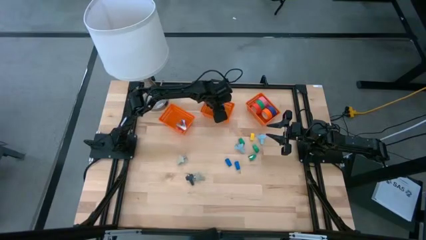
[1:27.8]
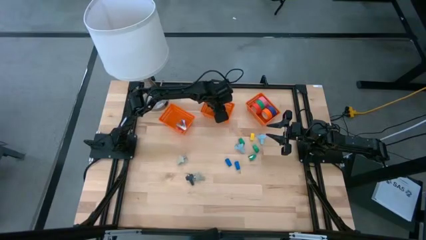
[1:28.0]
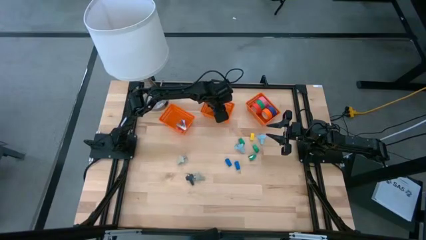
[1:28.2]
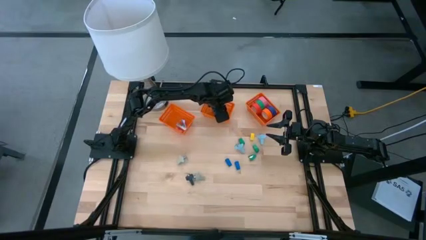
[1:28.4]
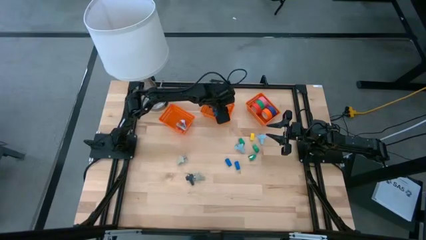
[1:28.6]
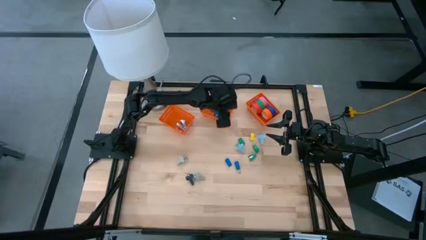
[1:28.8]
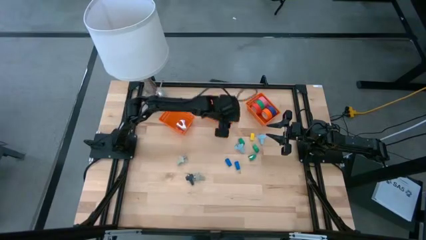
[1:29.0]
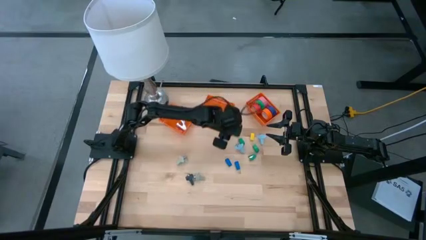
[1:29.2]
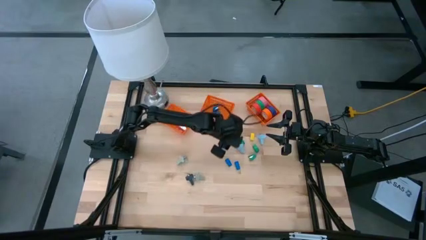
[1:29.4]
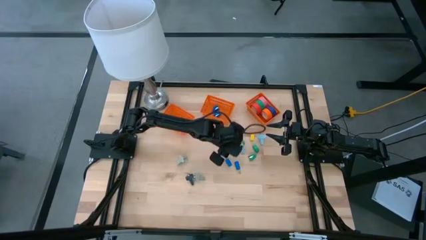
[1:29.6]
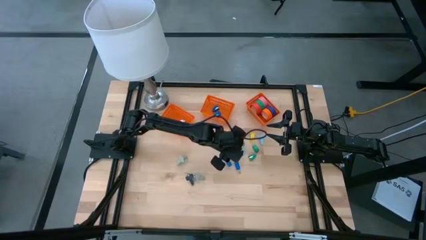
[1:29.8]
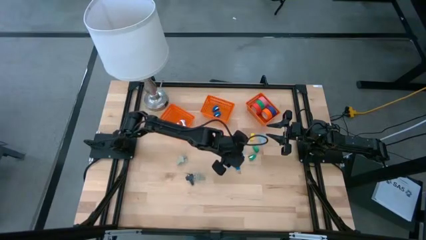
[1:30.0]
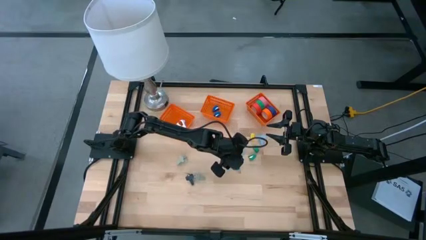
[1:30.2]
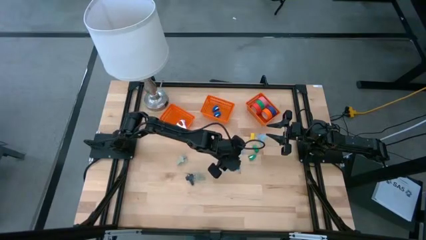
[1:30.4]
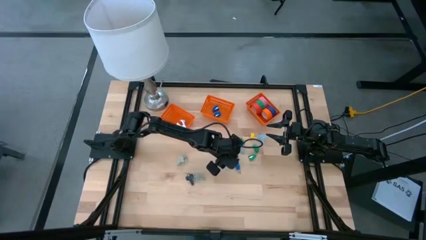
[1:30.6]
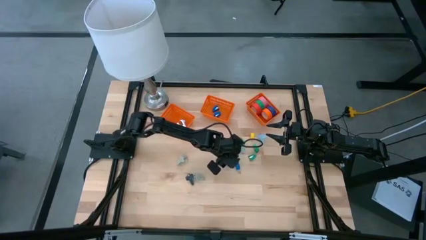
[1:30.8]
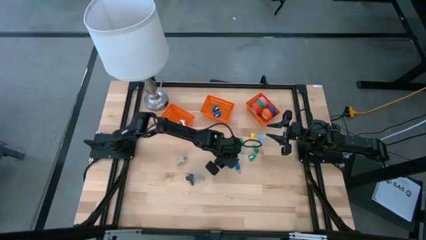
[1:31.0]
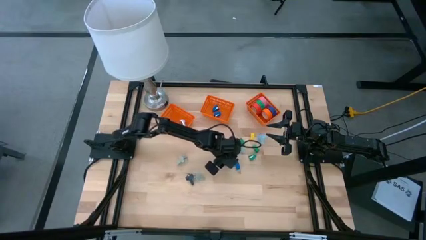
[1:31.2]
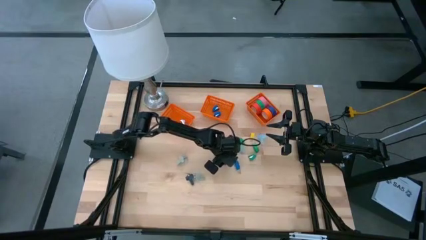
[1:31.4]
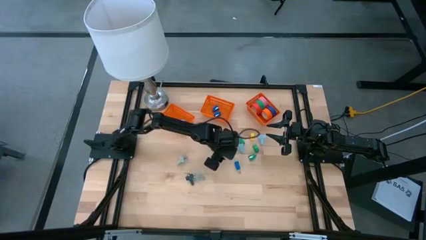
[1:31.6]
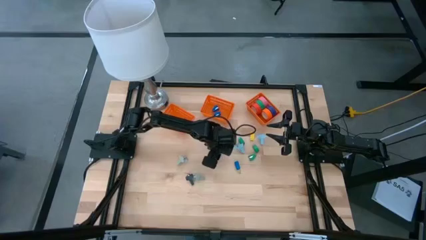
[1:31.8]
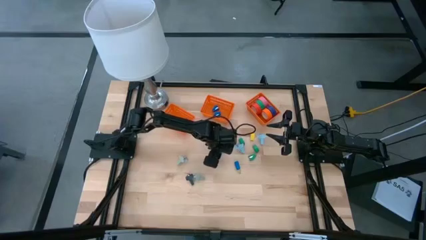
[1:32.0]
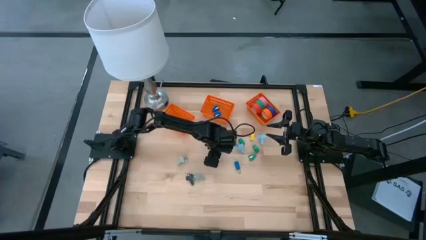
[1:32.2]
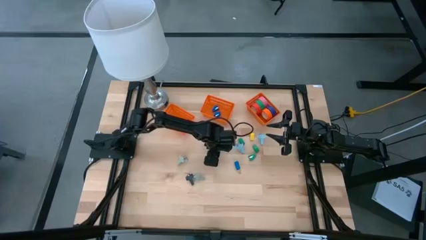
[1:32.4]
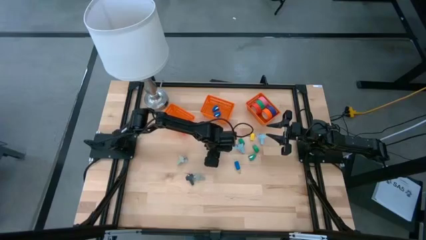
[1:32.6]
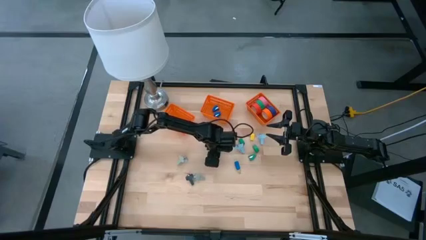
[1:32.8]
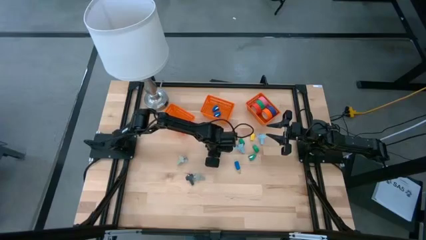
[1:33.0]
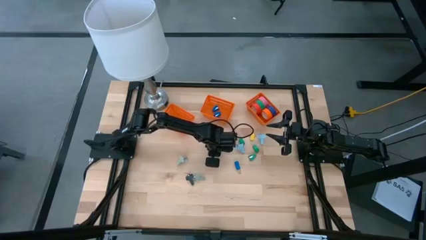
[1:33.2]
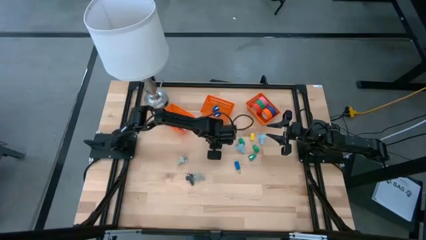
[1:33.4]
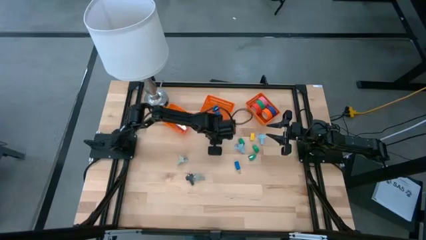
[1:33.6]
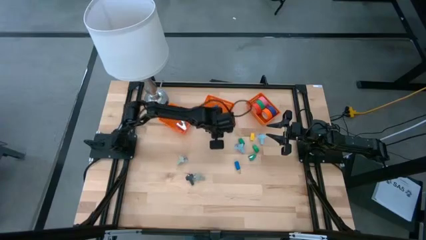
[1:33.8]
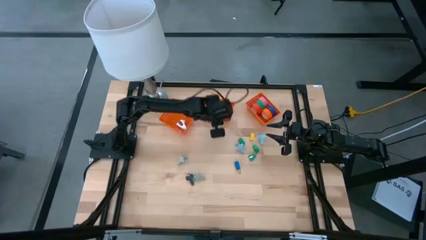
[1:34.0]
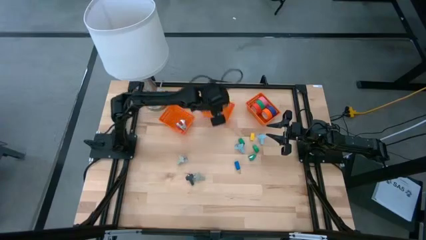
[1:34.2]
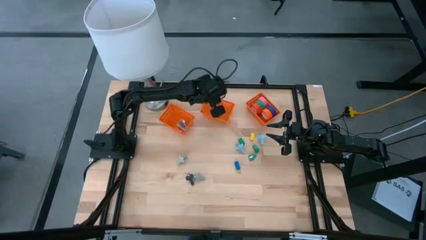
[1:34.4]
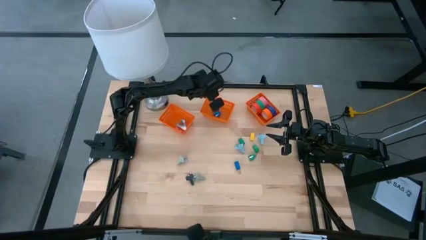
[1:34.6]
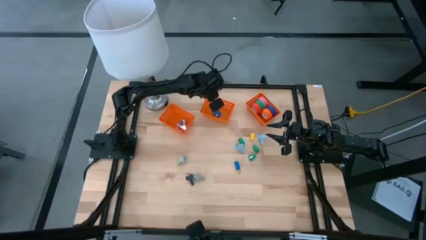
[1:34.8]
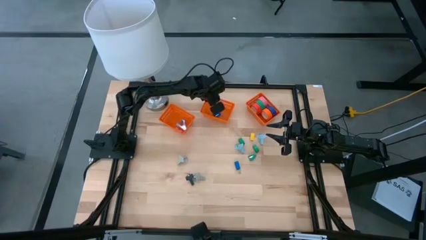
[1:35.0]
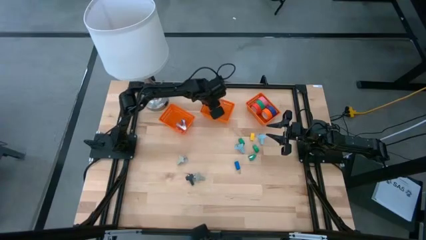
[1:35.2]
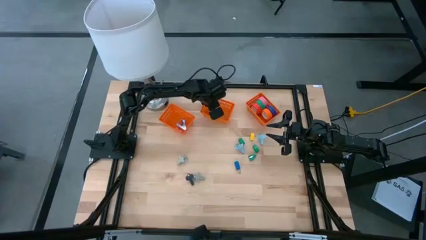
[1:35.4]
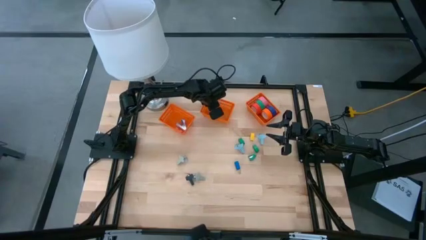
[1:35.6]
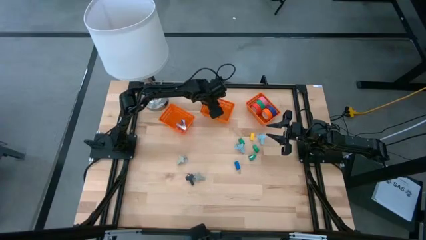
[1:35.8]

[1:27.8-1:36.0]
Task: Pick and place Stapler, Stapler remover, tape
Put the blue stapler into the middle orange bin

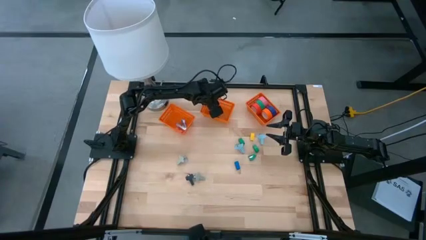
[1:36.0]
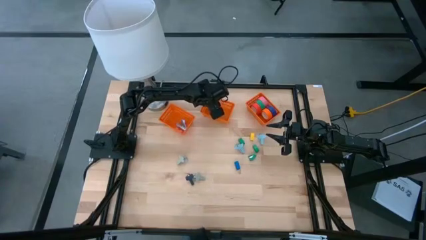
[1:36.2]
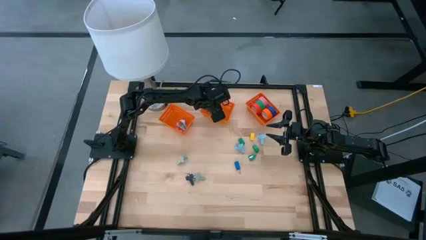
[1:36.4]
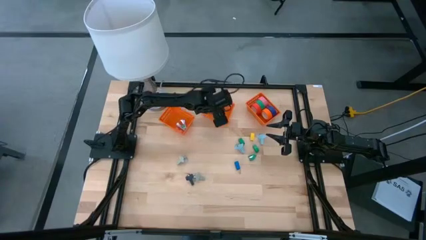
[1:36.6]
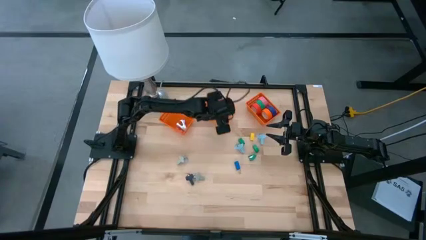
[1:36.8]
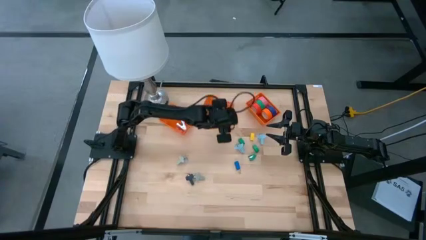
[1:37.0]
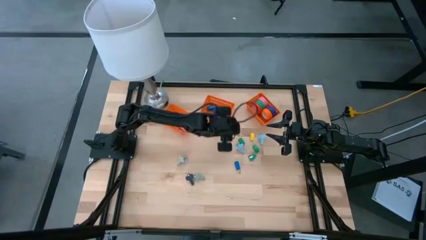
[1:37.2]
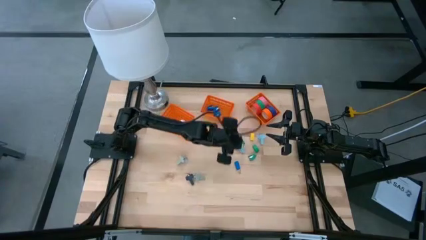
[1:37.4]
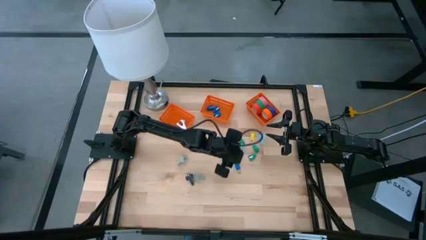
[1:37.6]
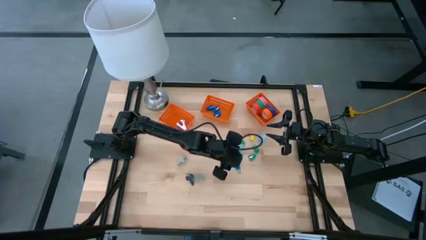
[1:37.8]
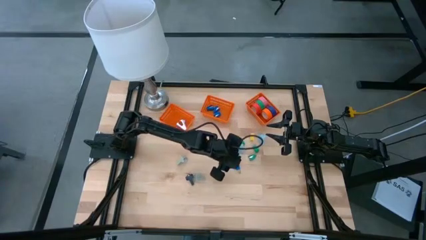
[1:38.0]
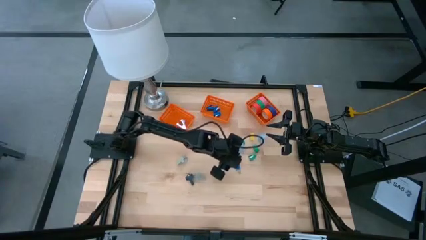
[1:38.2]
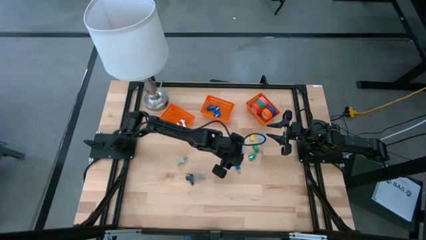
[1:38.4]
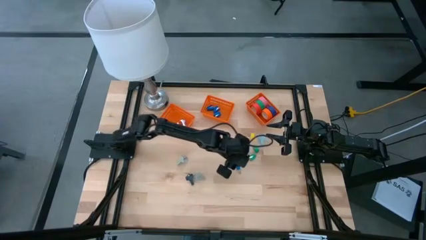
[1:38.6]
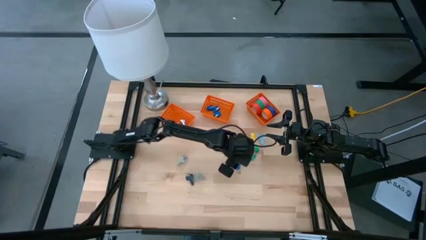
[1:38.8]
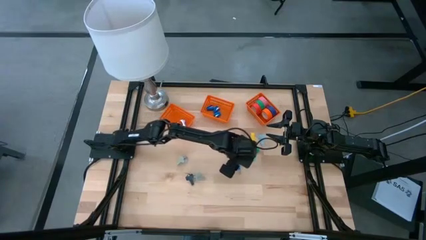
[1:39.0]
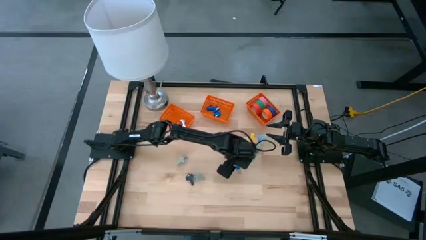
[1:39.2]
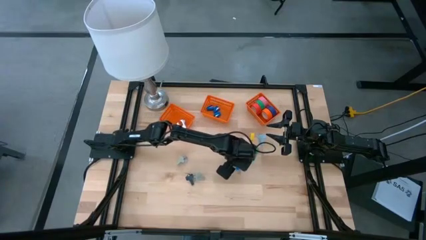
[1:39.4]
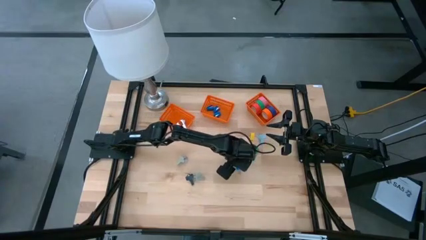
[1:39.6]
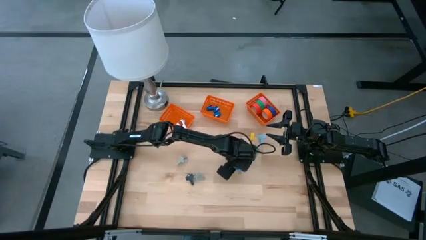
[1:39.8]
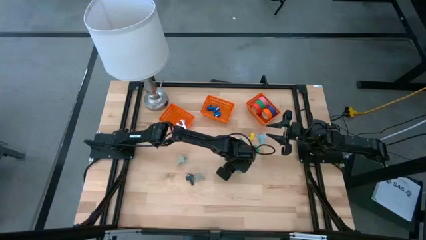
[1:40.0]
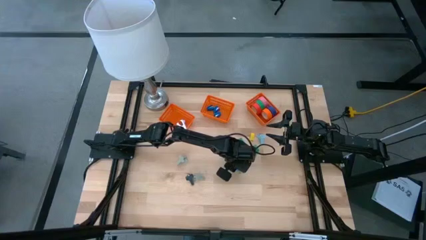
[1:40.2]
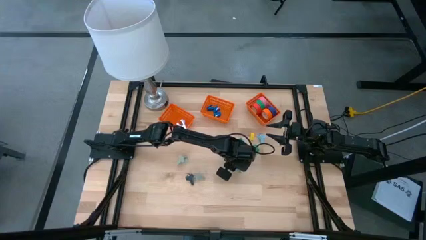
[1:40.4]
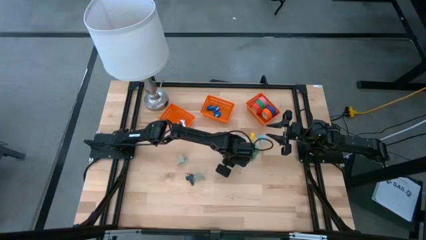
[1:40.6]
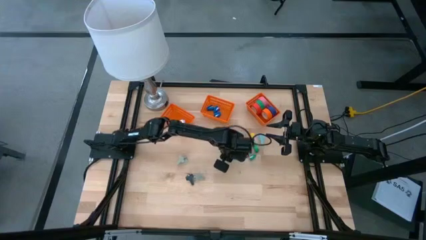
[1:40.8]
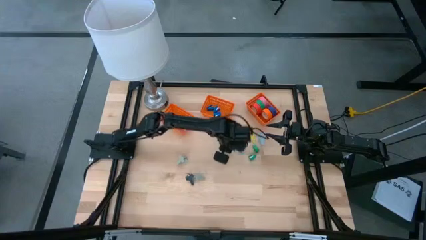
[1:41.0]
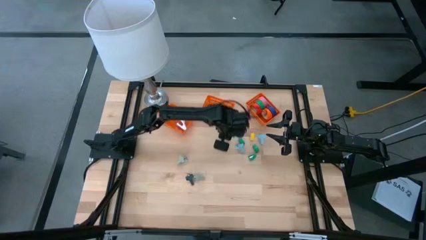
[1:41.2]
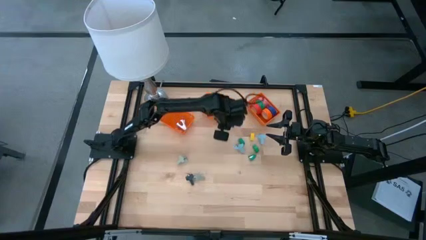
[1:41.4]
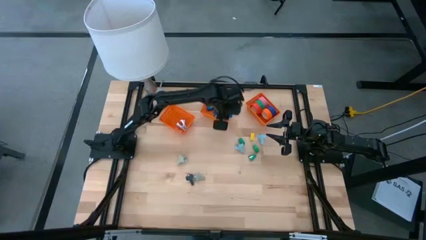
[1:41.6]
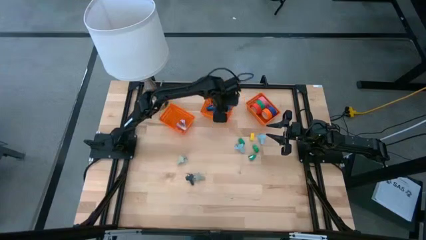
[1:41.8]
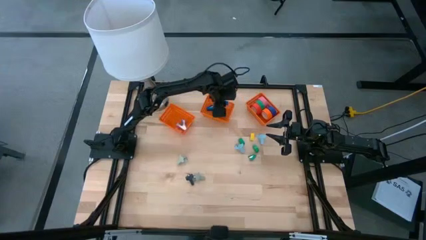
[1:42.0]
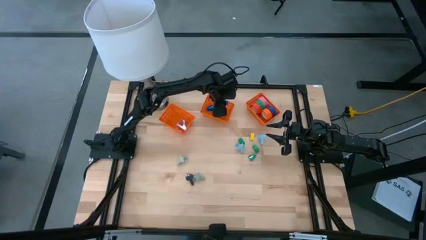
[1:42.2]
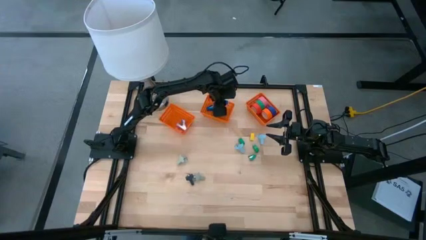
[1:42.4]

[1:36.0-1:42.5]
Put the blue stapler into the middle orange bin
